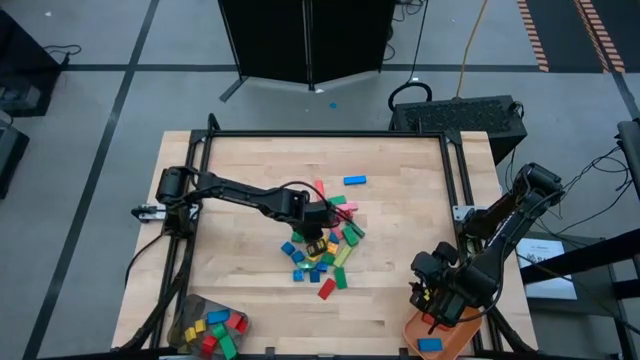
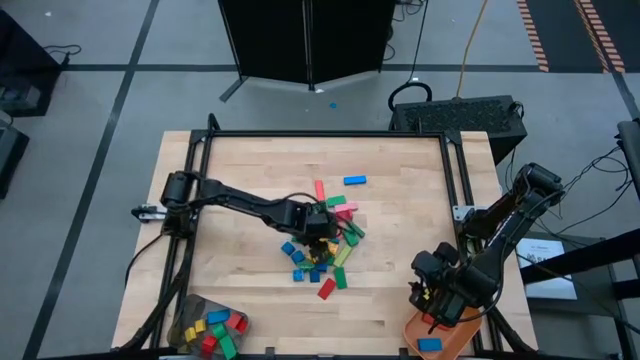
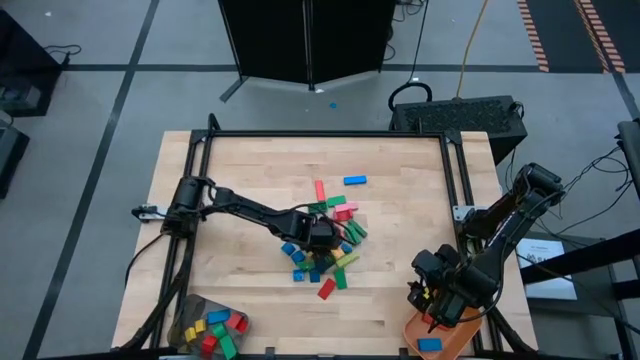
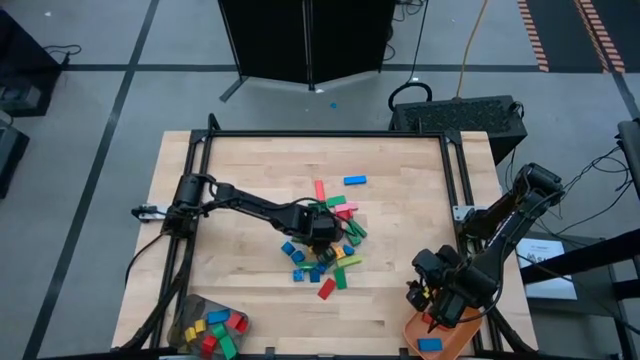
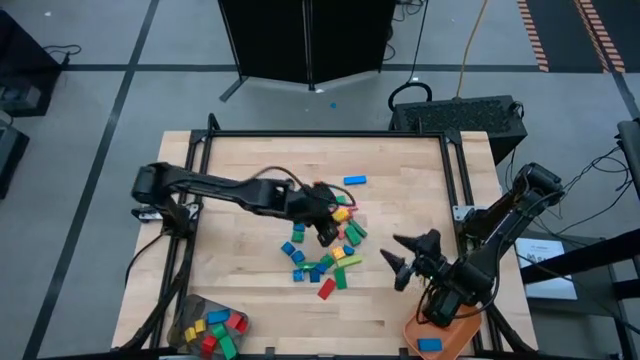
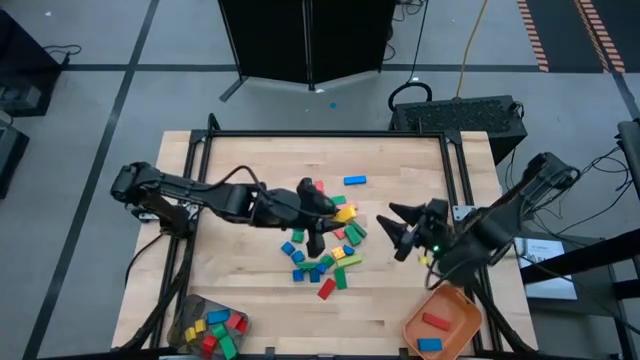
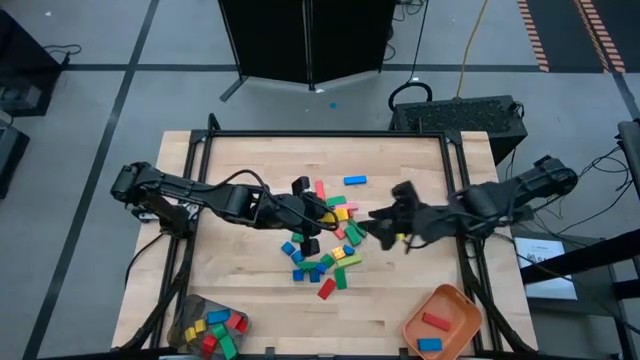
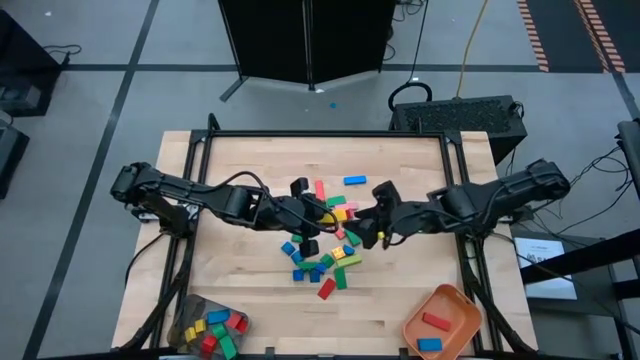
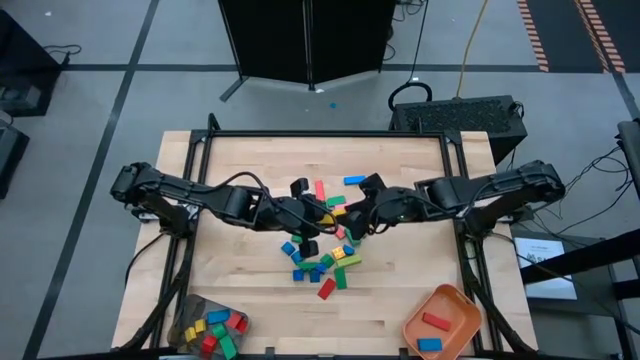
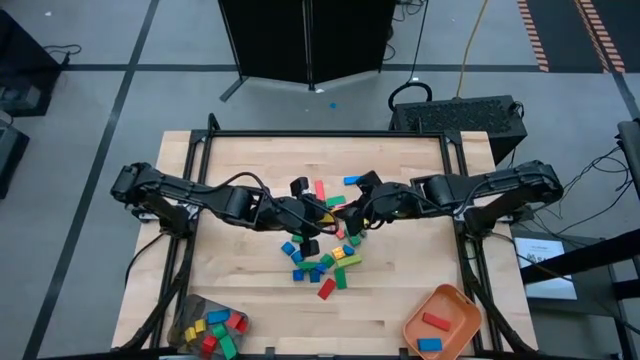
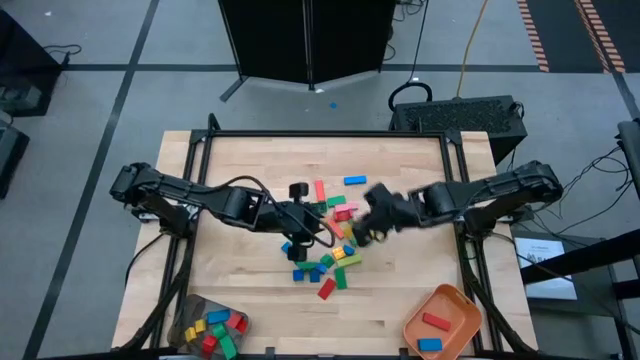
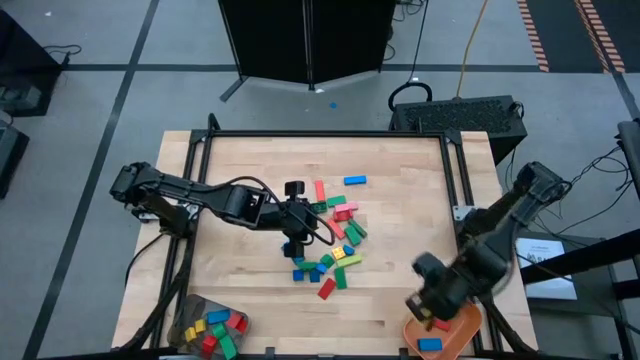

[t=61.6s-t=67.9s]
Task: Sort blocks by size
Put the yellow rectangular block into the orange bin

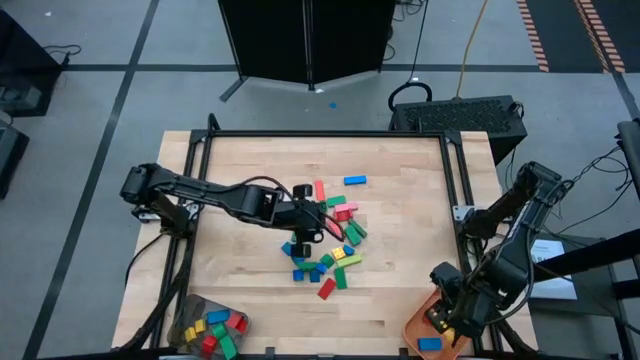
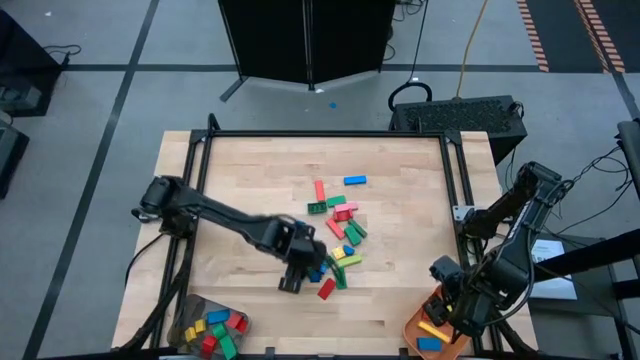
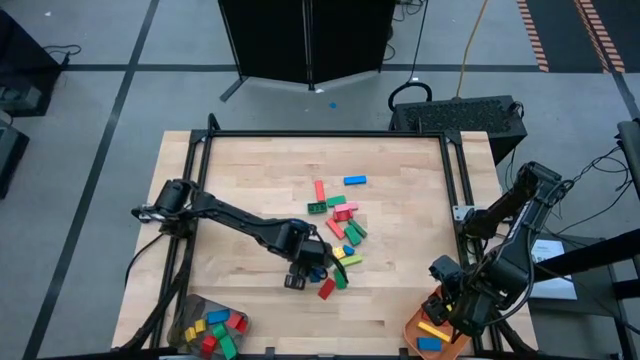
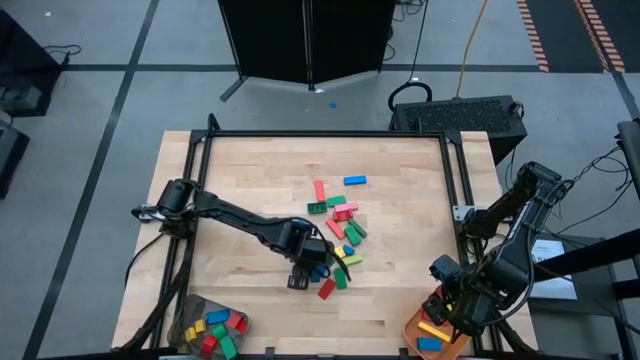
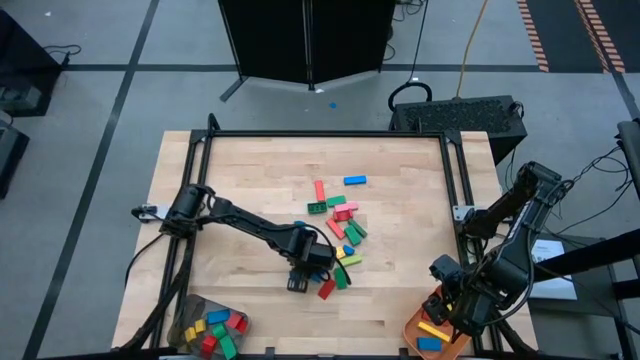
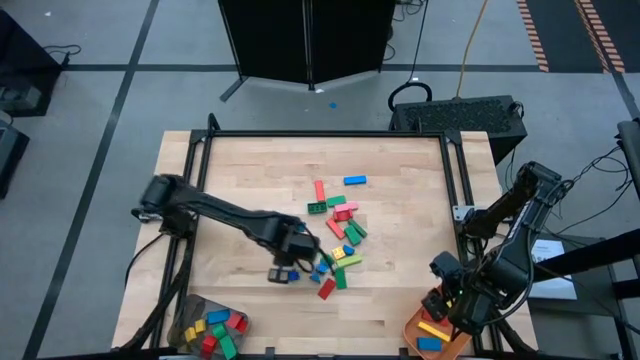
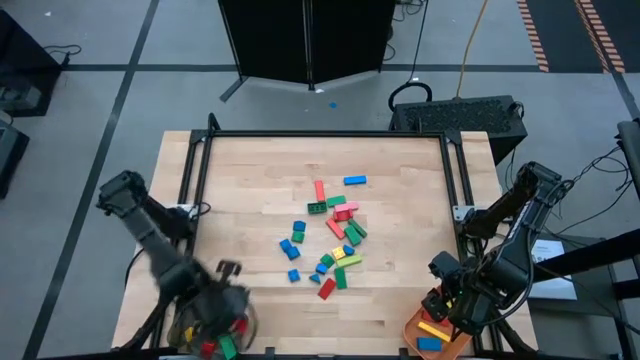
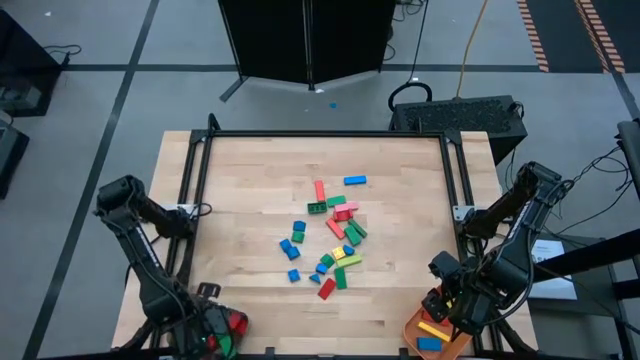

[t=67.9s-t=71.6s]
Put the green square game piece into the black bin

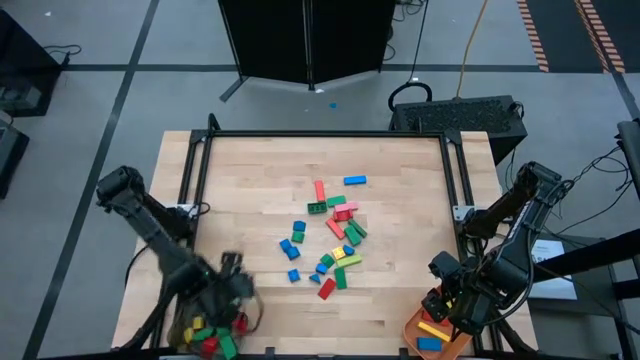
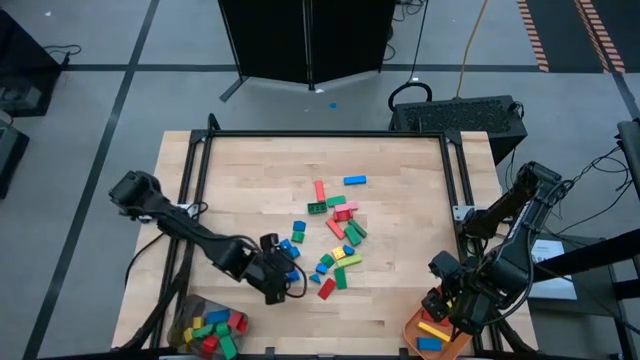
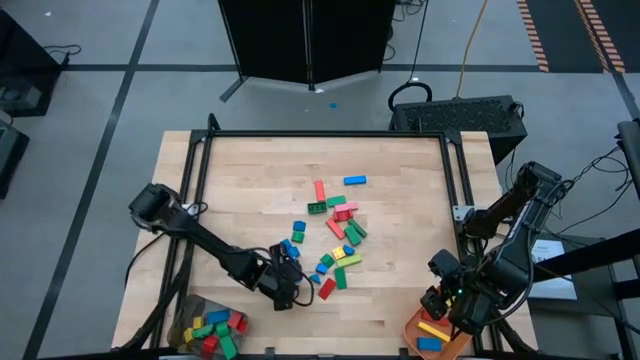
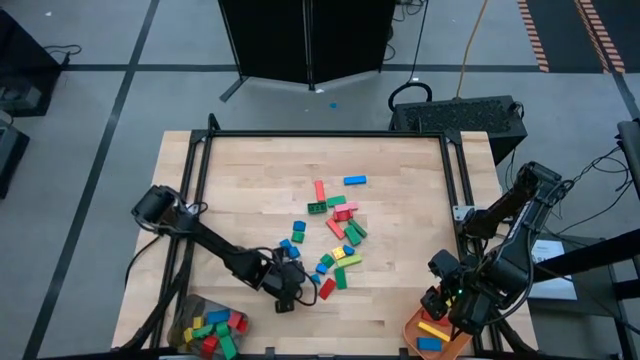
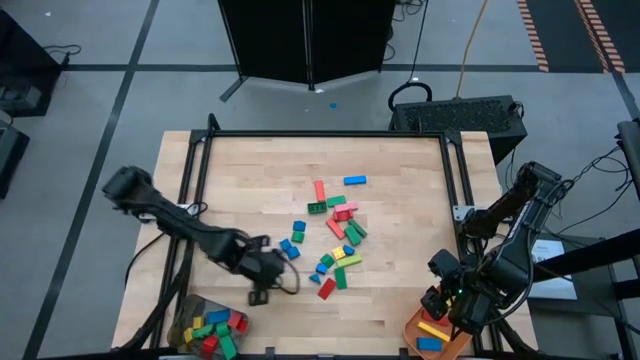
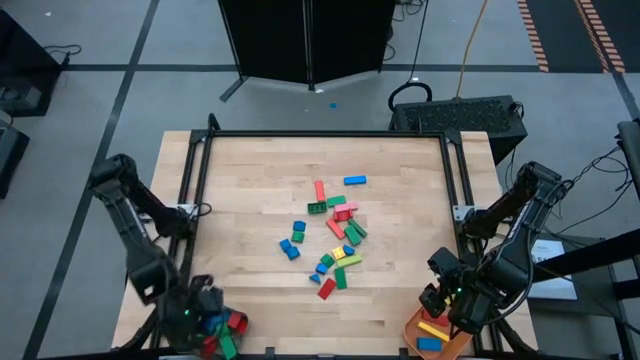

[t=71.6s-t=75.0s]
Put the blue square game piece into the black bin

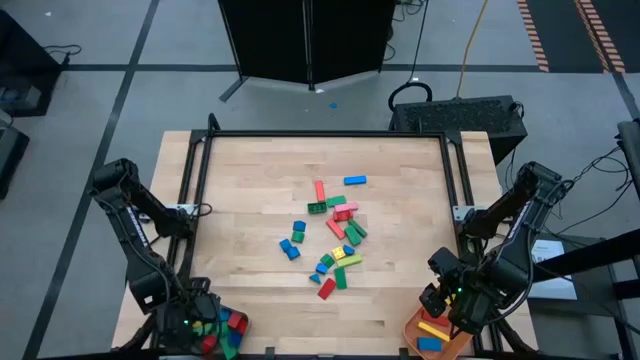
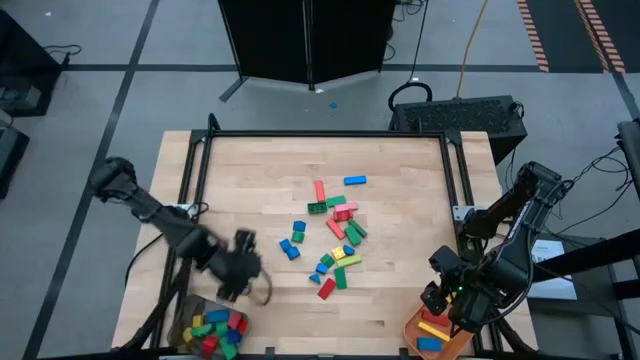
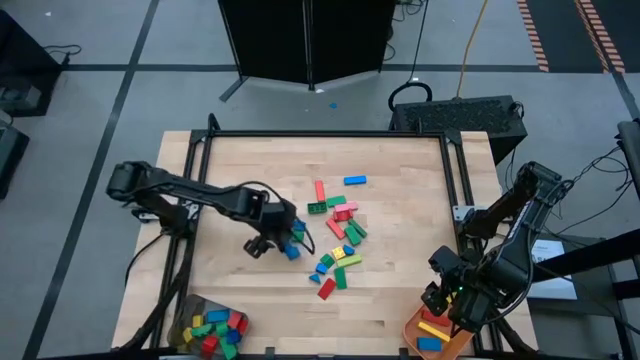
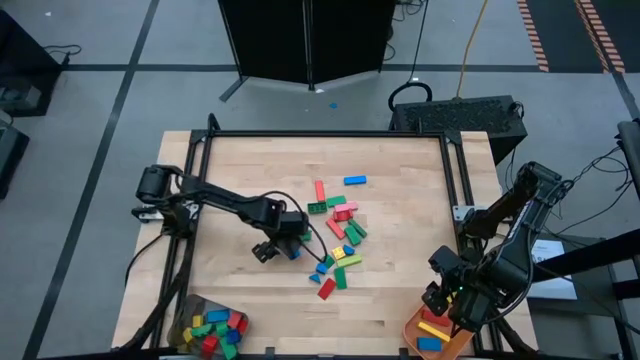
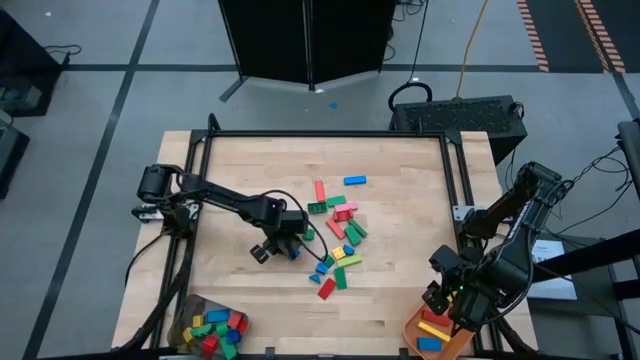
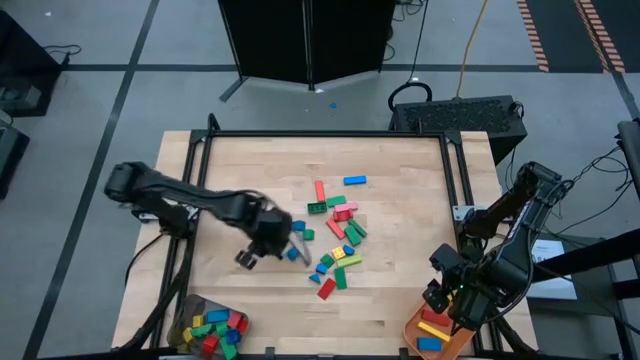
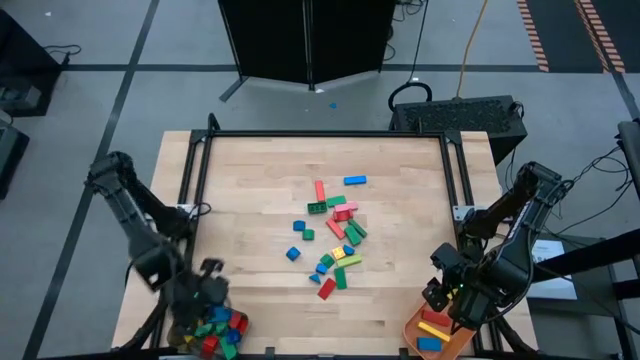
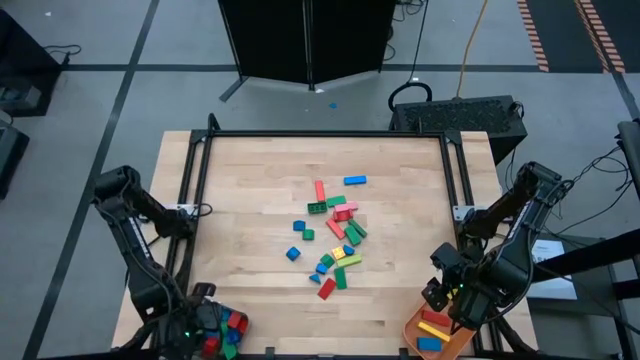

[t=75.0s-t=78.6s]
Put the blue semicircle block into the black bin

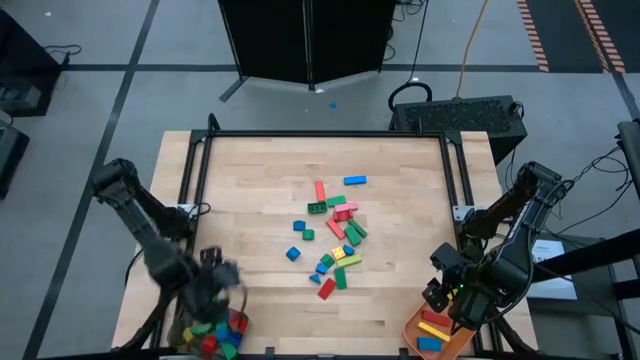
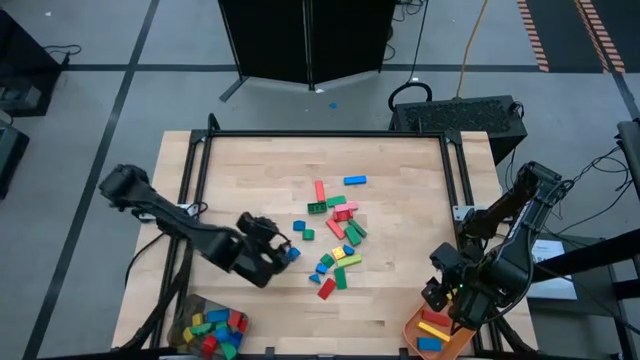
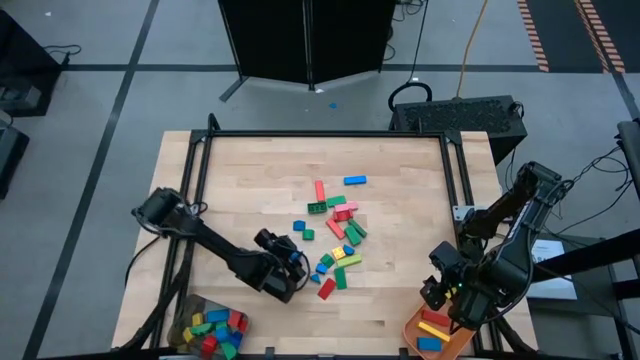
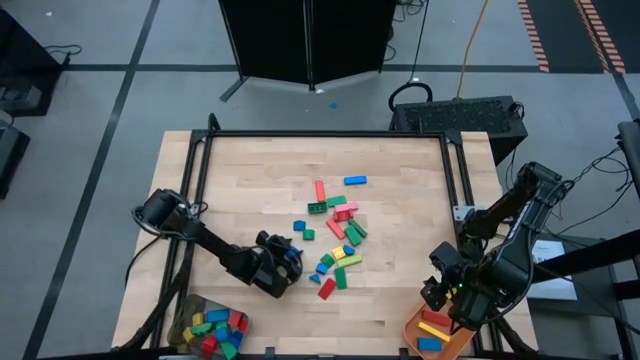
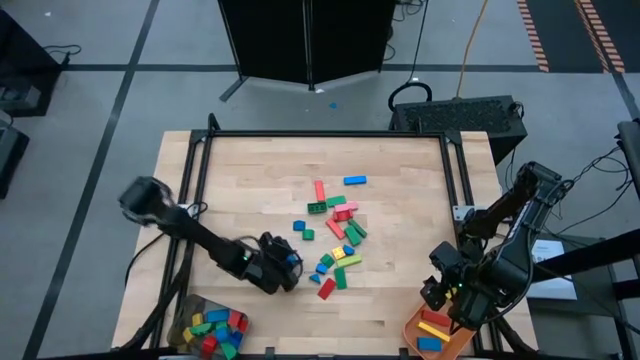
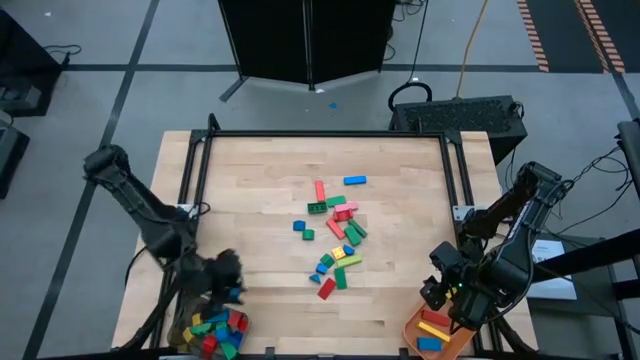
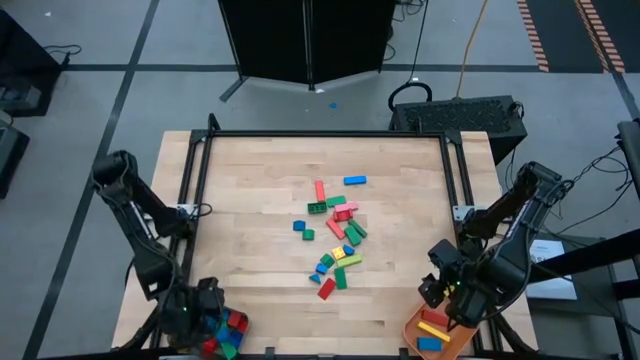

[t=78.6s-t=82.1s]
Put the blue semicircle block into the black bin

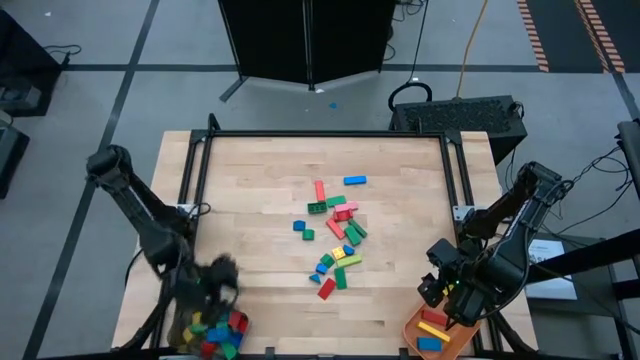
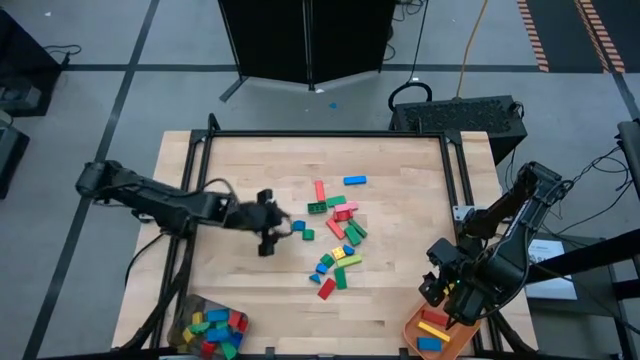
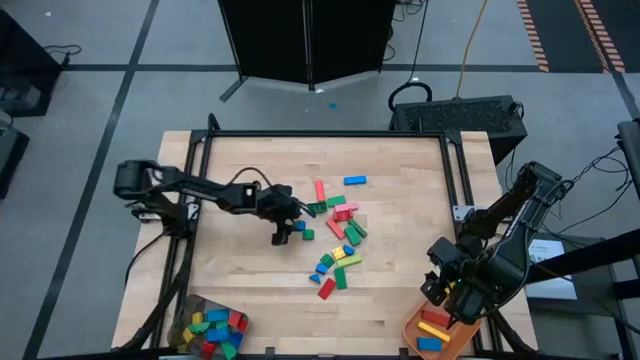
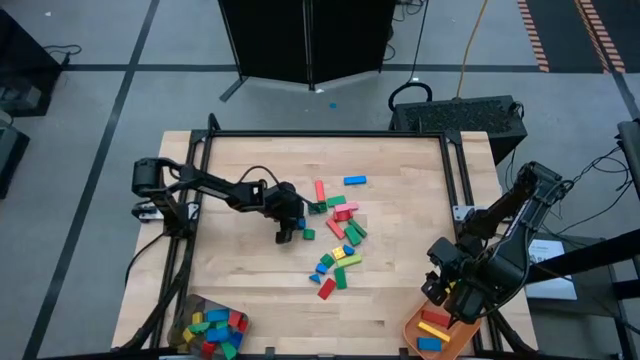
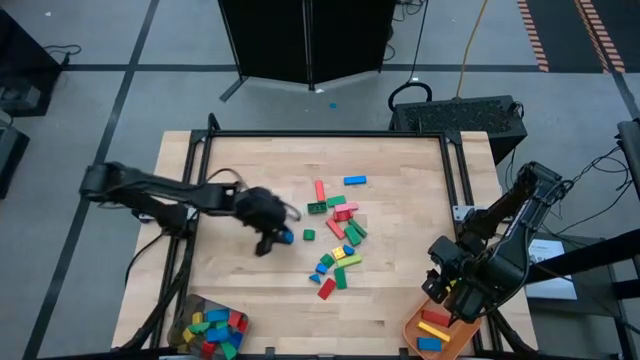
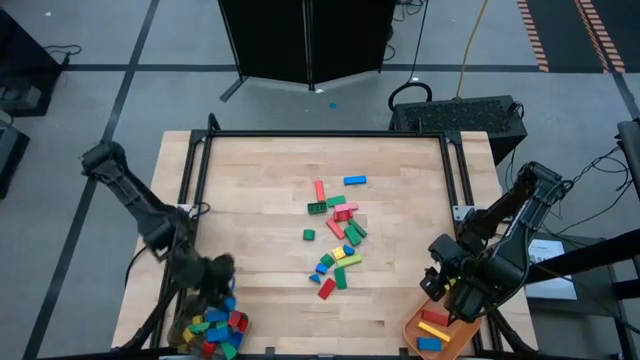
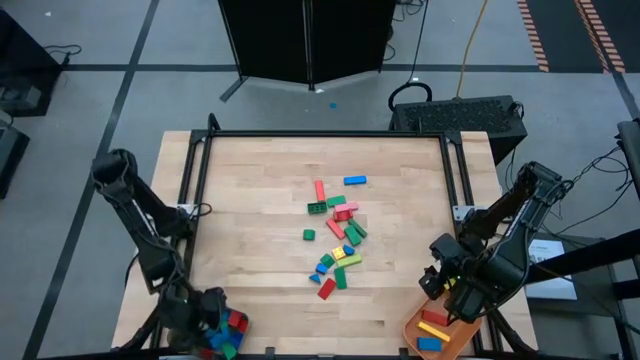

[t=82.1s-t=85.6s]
Put the blue triangular block into the black bin
